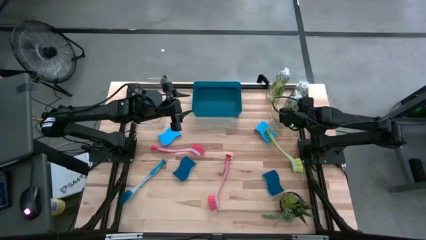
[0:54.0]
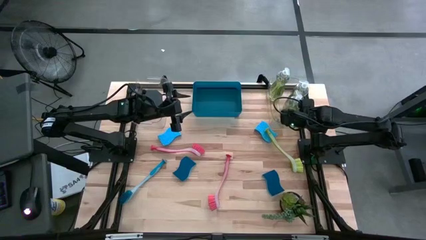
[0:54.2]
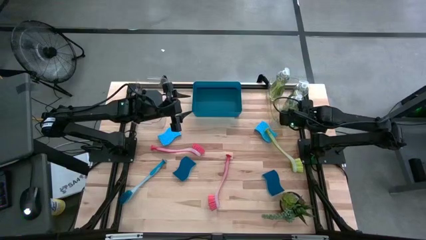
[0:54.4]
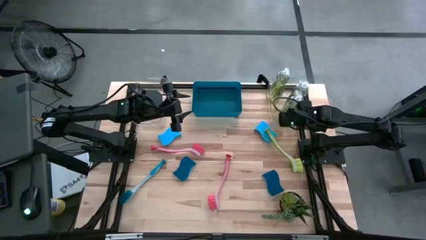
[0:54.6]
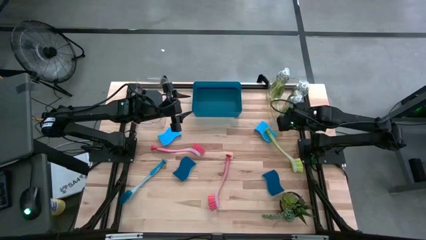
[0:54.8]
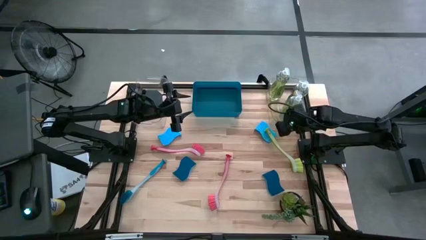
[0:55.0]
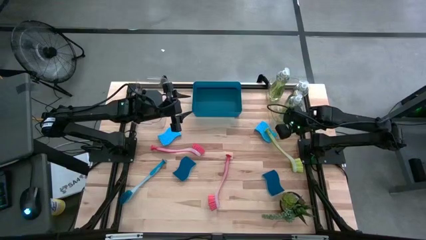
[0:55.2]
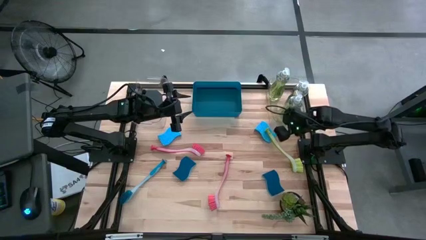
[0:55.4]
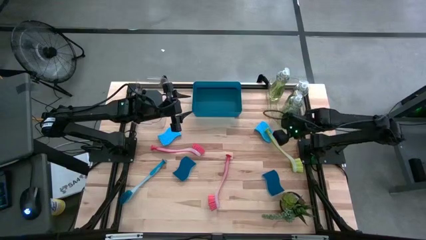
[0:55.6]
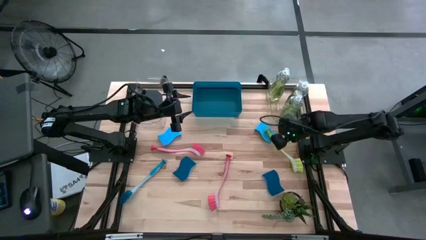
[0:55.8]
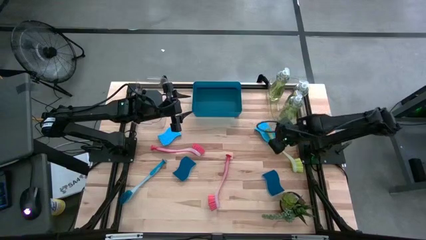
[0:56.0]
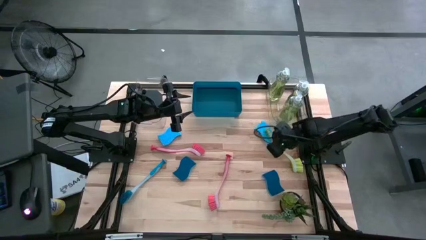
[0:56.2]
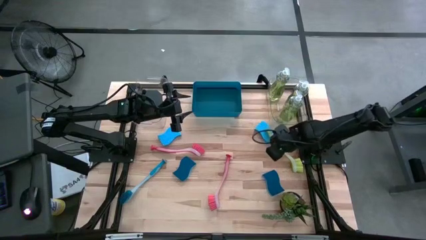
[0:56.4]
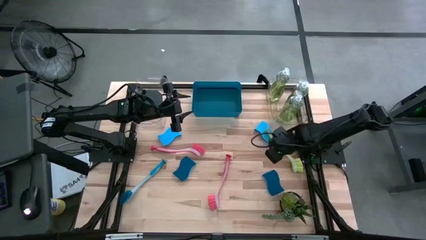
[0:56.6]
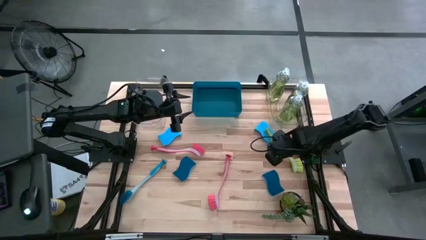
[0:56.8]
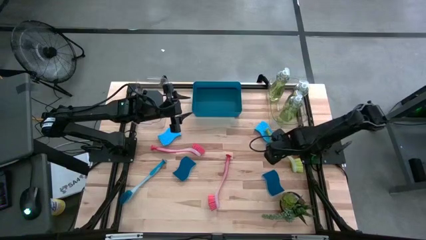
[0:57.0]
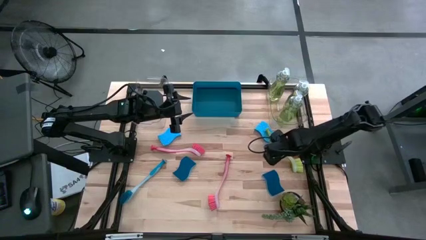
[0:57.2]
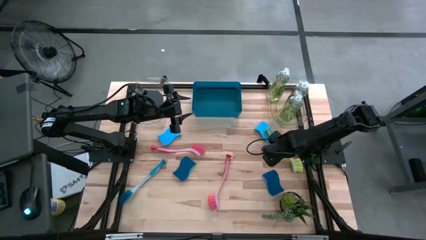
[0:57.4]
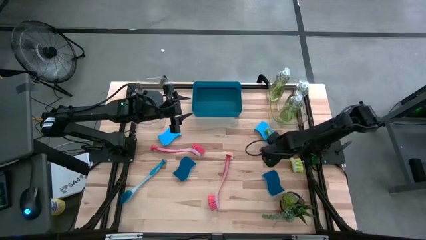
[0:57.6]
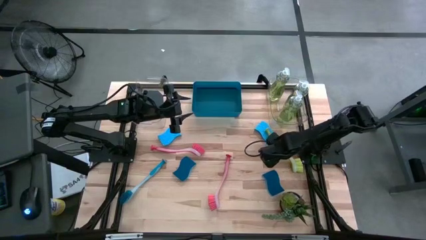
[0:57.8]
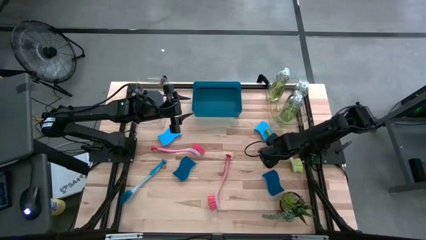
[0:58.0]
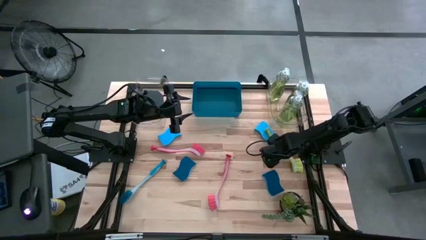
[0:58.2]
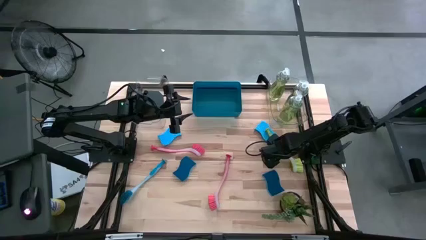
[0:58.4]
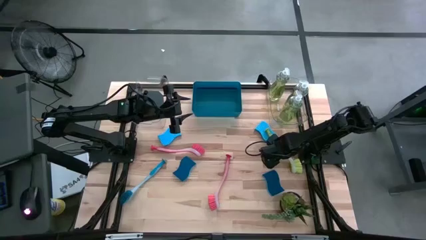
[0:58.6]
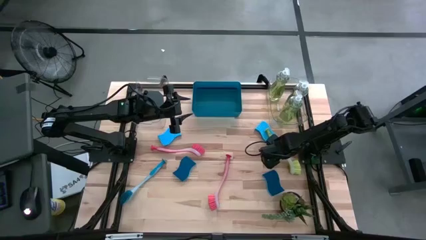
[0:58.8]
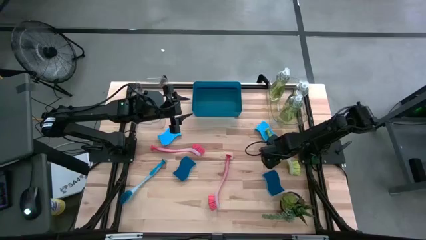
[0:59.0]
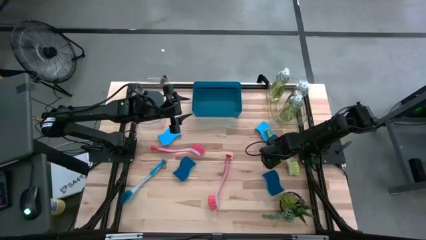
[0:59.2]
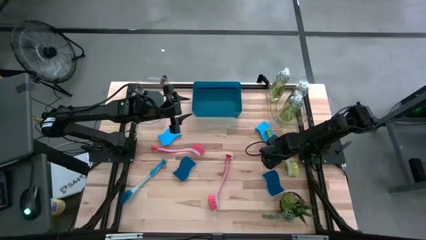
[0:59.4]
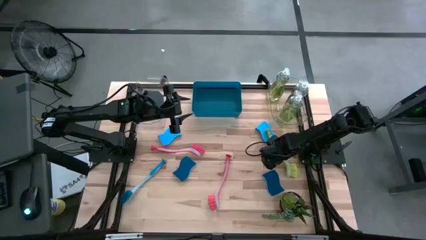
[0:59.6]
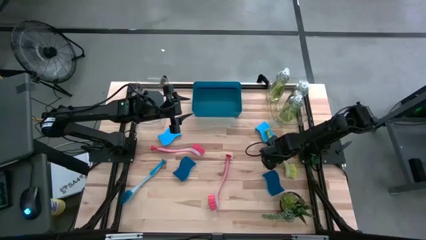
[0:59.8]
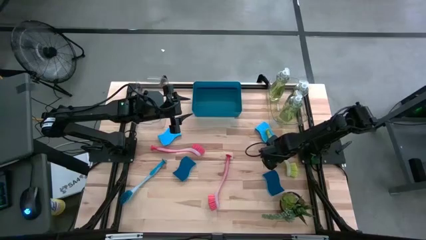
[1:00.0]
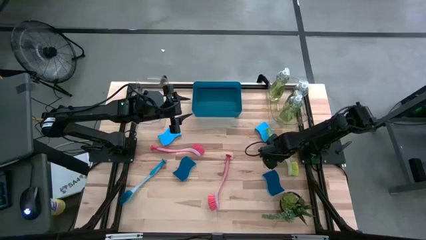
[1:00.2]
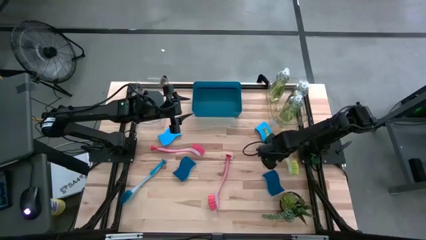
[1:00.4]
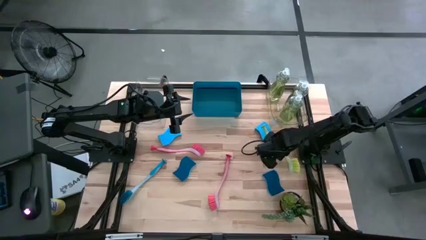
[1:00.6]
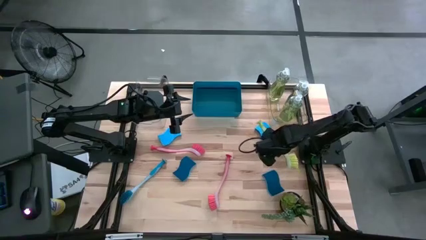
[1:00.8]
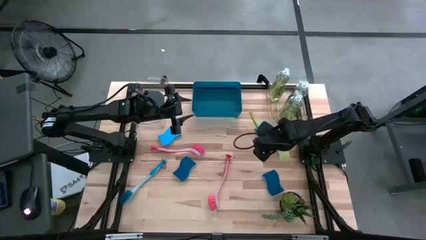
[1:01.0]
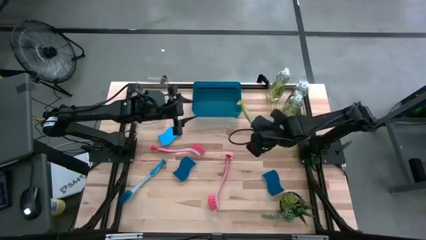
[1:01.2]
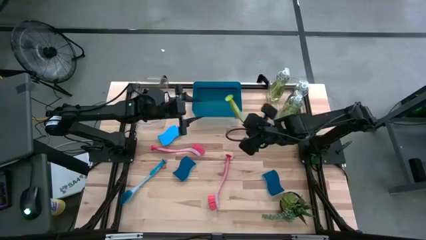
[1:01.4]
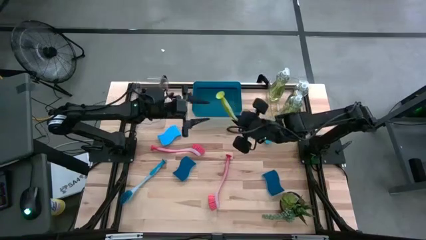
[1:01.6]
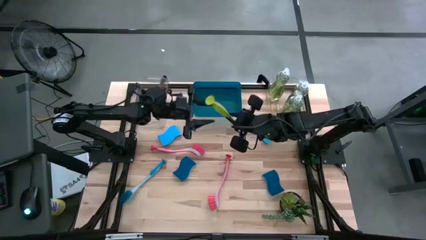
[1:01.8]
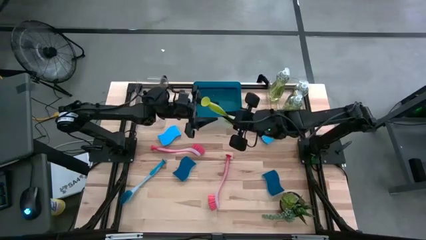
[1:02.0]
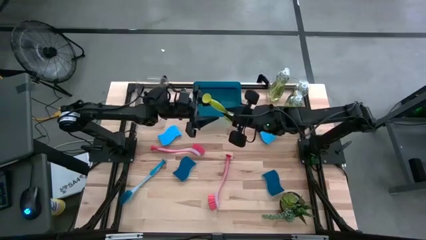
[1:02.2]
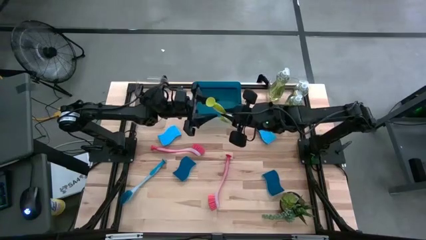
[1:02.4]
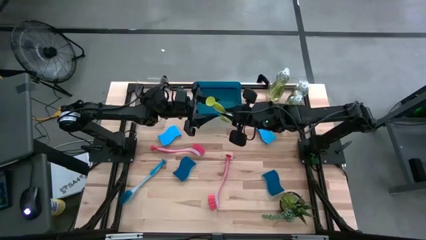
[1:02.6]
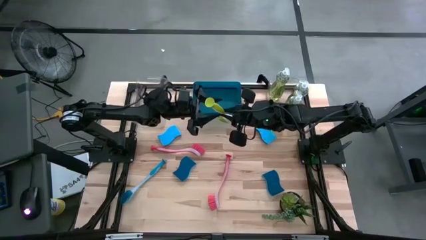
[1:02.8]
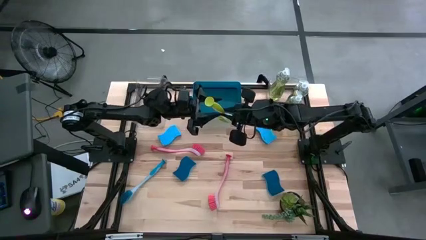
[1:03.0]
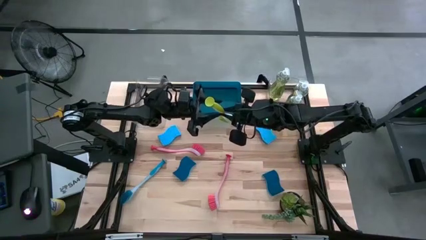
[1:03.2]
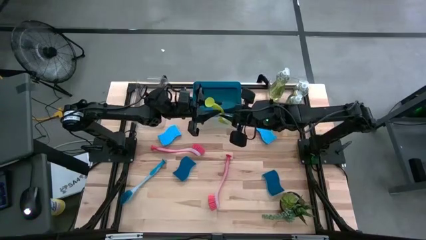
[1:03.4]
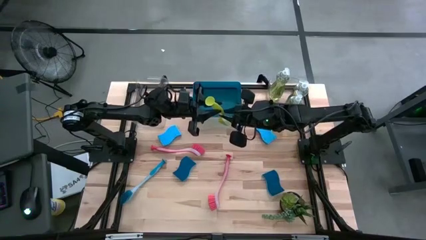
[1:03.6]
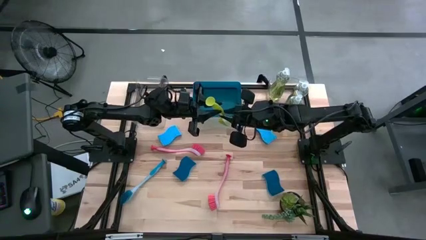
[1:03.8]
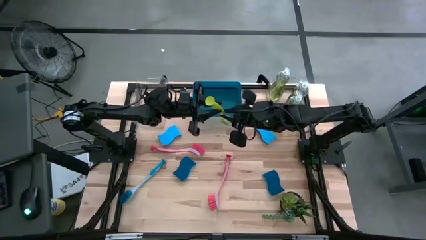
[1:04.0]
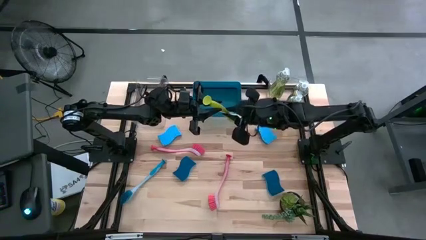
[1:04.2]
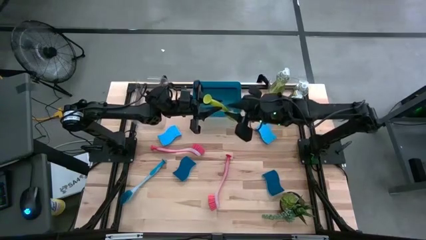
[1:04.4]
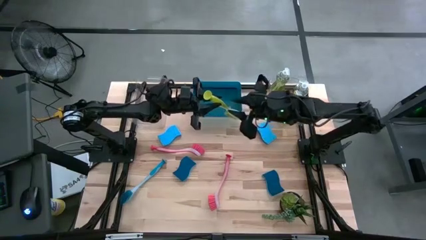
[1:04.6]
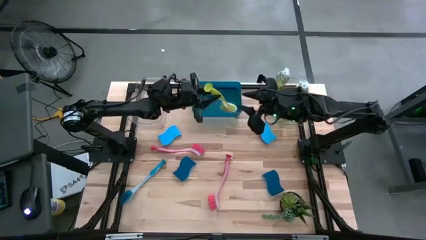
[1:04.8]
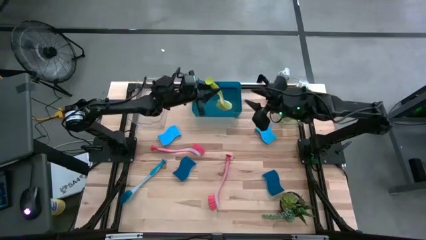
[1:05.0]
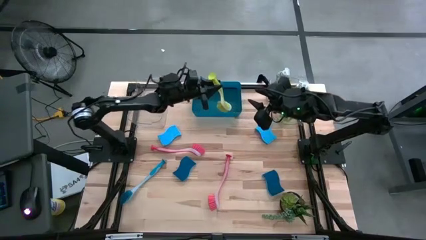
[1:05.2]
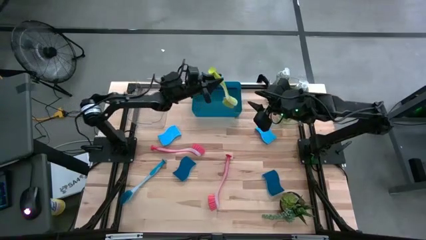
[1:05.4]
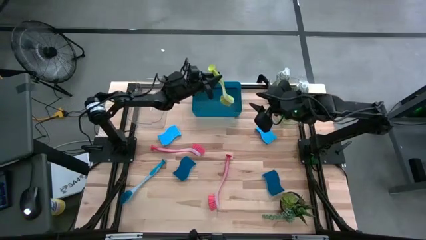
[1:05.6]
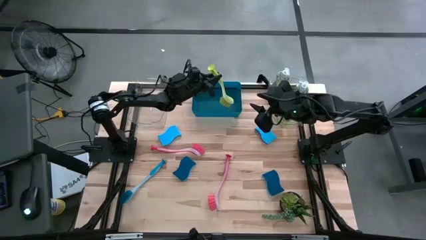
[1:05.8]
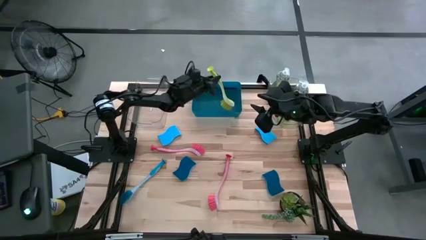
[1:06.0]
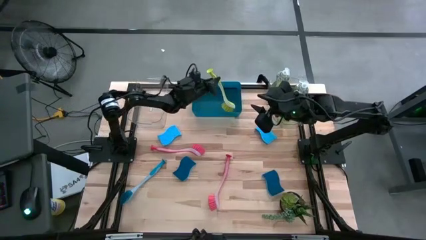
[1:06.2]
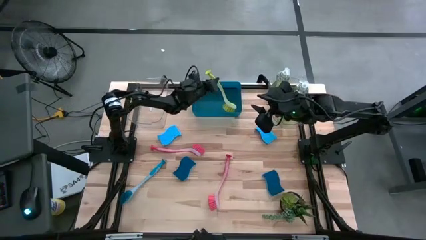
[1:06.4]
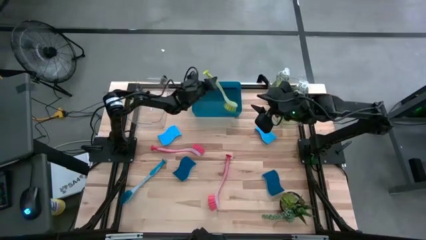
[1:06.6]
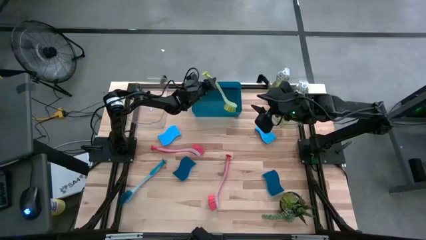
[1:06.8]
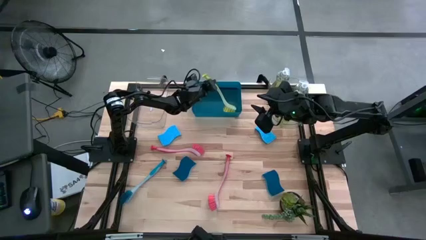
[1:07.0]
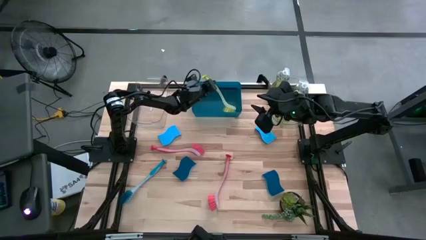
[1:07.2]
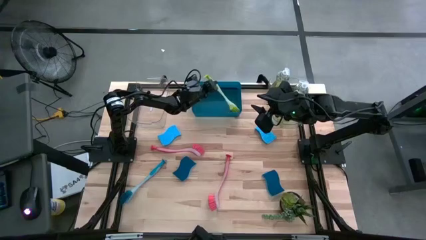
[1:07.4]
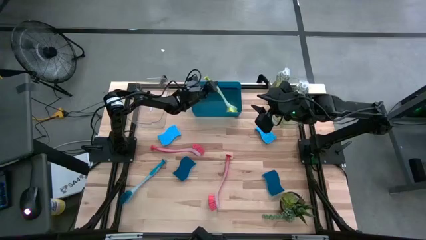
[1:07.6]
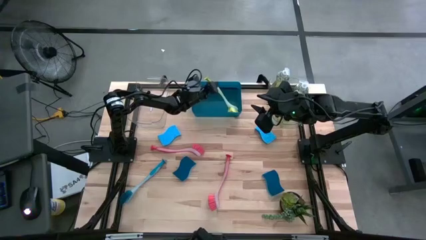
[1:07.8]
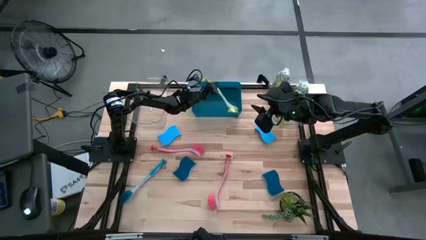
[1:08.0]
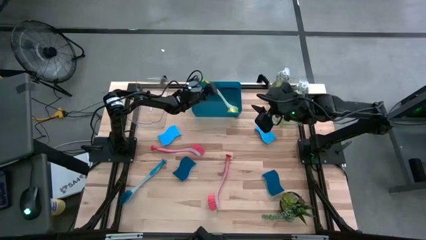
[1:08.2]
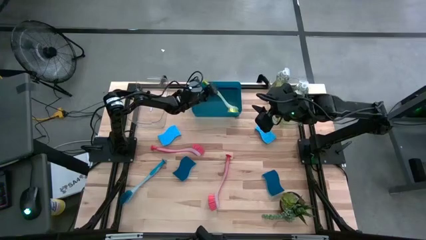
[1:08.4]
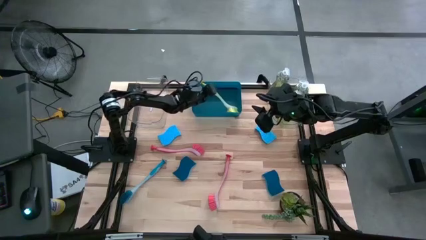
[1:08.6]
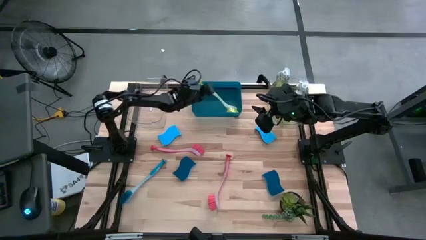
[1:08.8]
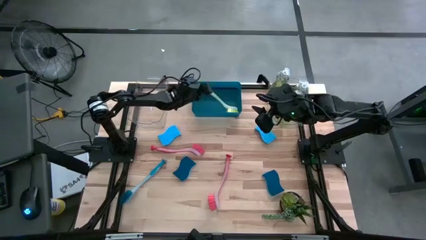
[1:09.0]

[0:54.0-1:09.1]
Task: Pick & Place Kitchen Sink Supplies
Put the green dish brush into the blue bin

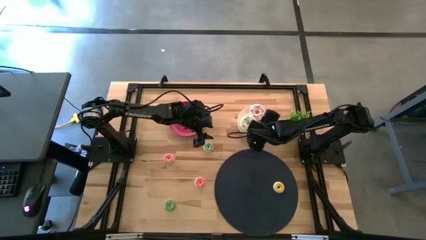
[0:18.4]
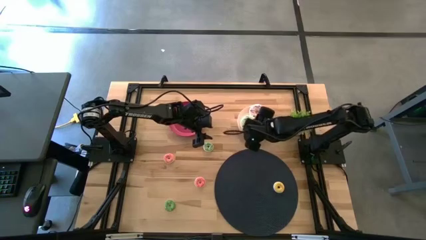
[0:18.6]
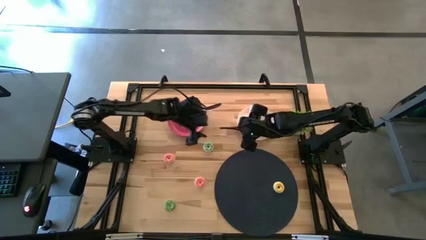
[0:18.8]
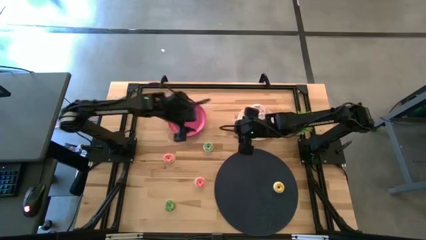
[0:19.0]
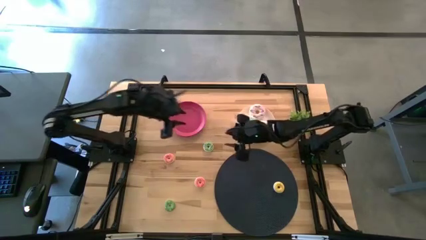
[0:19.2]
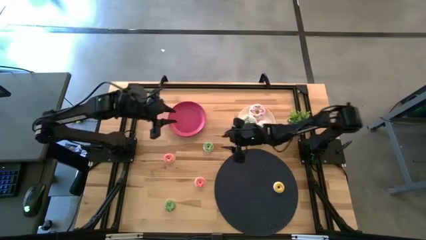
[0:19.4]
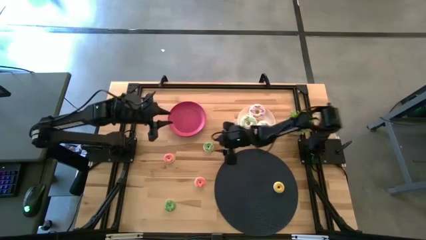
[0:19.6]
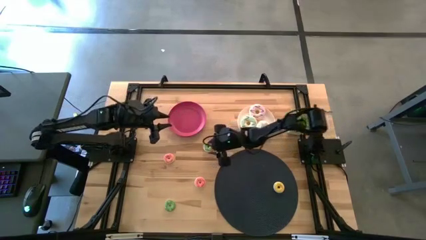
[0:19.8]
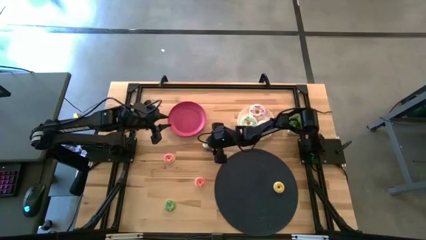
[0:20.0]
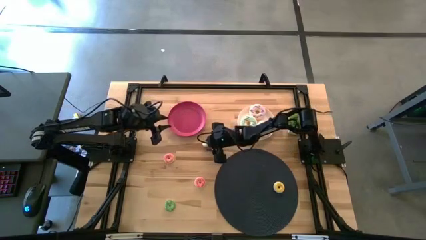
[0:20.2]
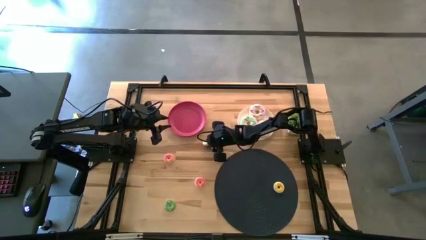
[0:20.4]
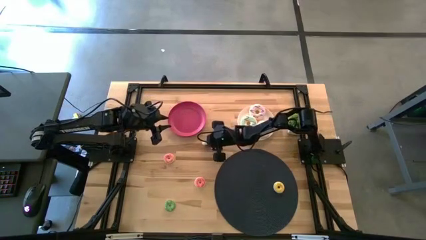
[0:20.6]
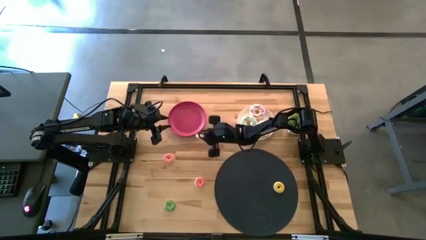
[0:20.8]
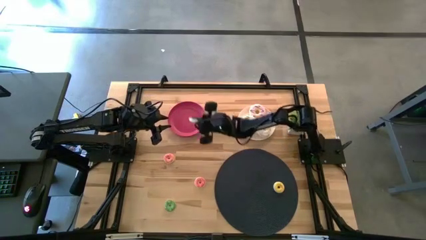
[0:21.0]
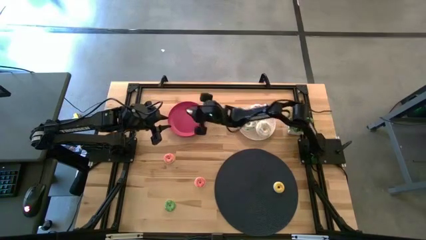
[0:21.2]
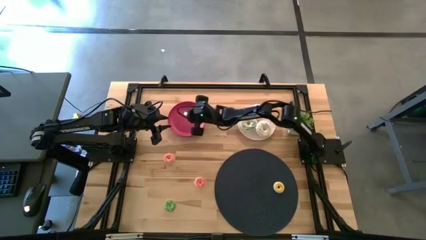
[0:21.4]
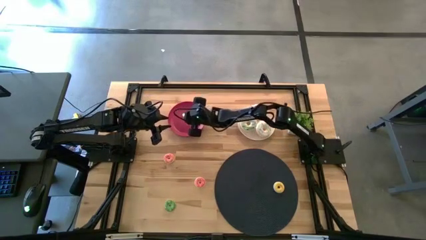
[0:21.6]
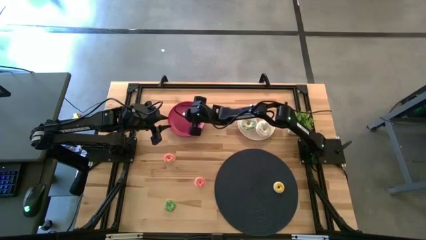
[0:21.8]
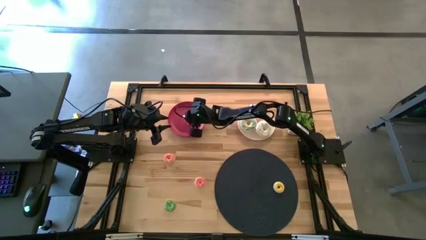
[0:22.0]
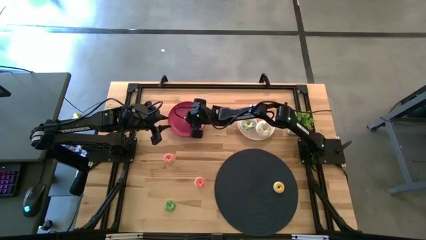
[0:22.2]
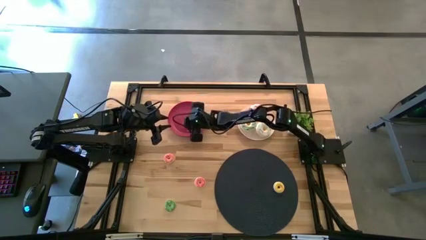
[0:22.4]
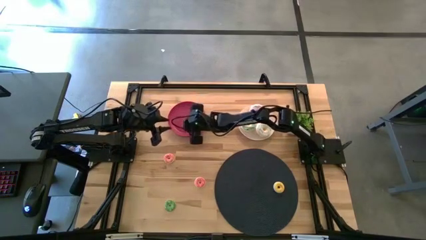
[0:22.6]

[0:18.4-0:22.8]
Task: Pick & Place donuts
Put the top small green donut on the pink plate
